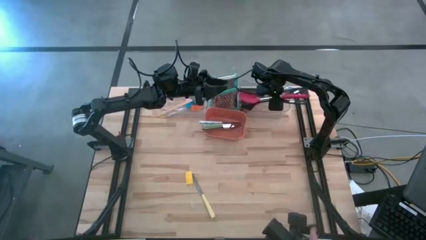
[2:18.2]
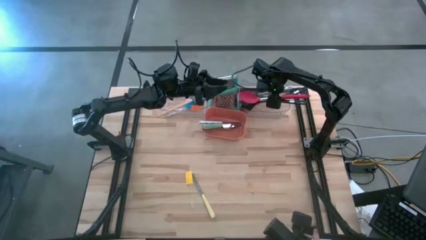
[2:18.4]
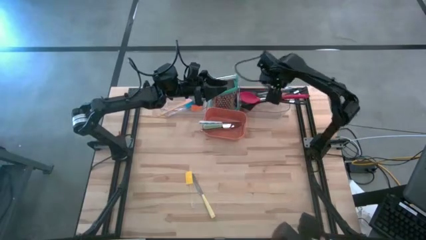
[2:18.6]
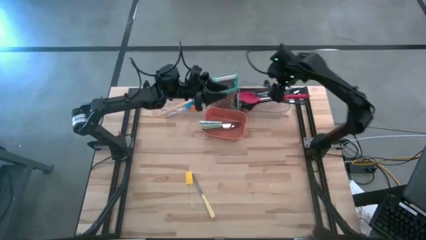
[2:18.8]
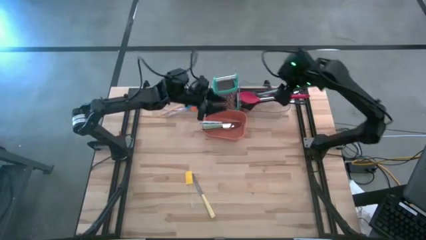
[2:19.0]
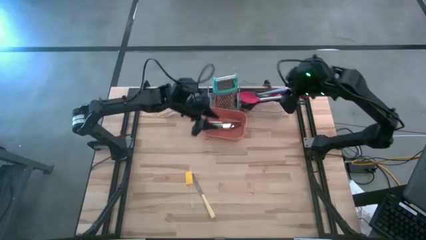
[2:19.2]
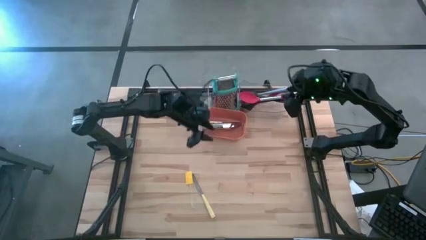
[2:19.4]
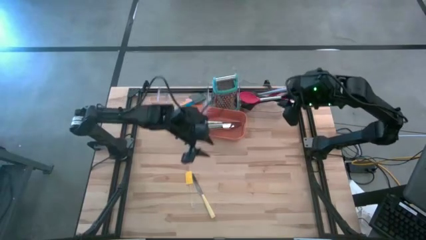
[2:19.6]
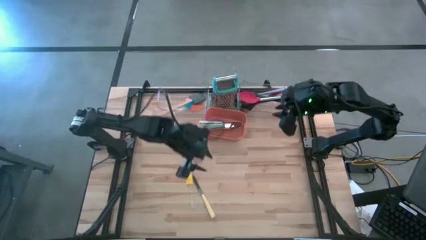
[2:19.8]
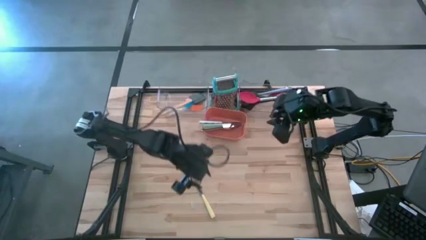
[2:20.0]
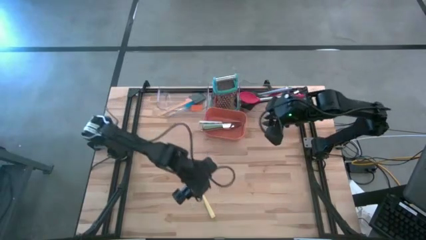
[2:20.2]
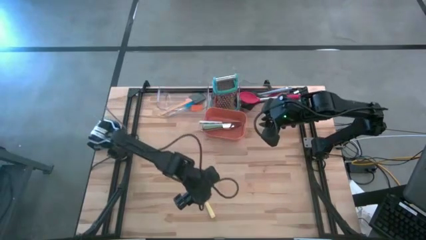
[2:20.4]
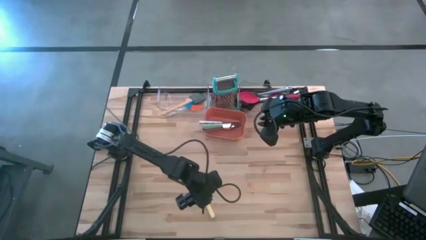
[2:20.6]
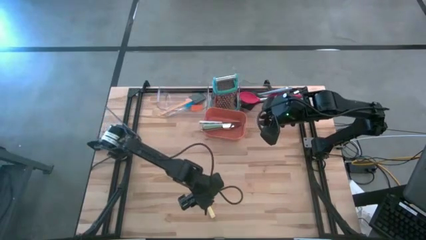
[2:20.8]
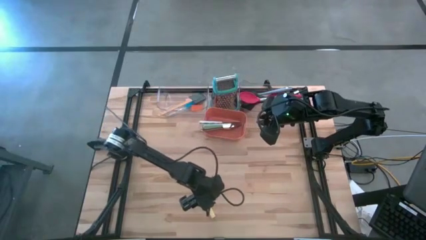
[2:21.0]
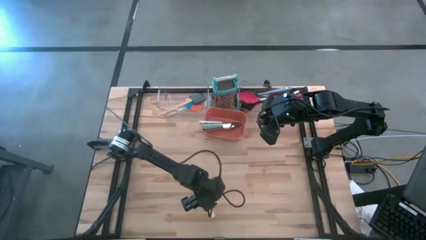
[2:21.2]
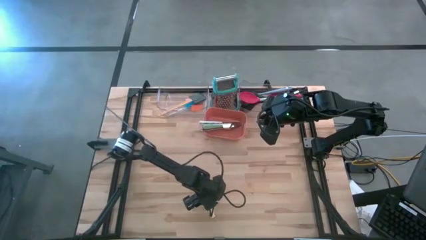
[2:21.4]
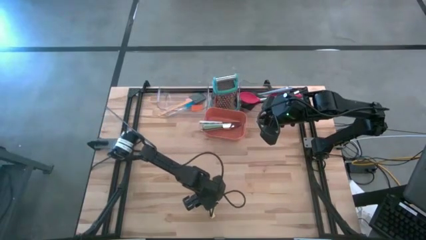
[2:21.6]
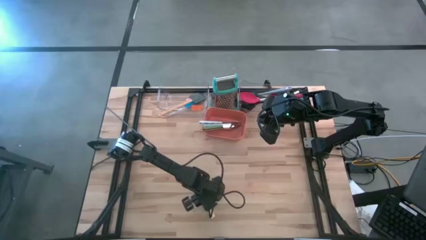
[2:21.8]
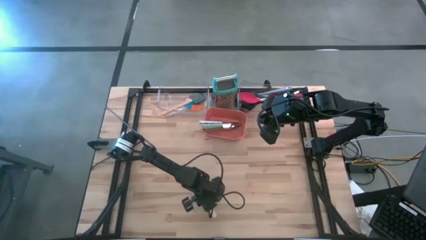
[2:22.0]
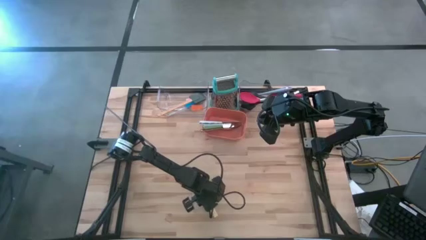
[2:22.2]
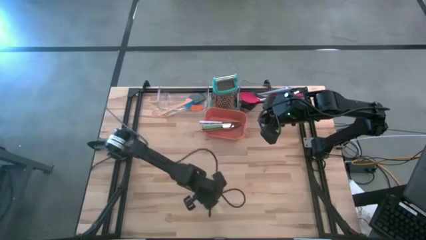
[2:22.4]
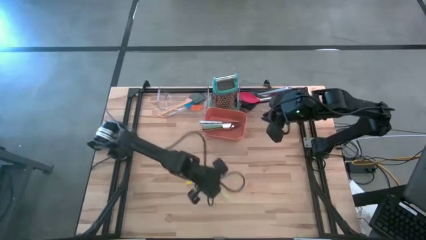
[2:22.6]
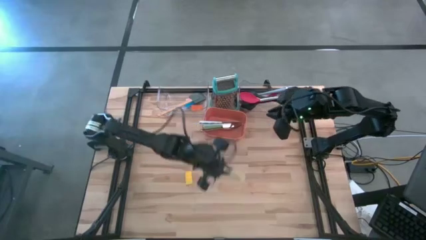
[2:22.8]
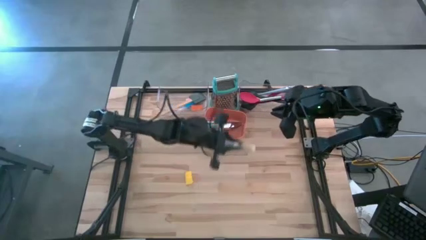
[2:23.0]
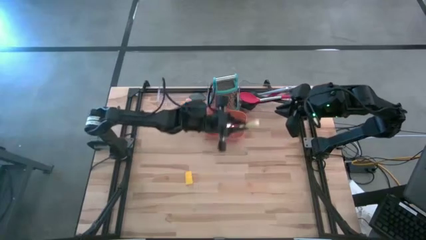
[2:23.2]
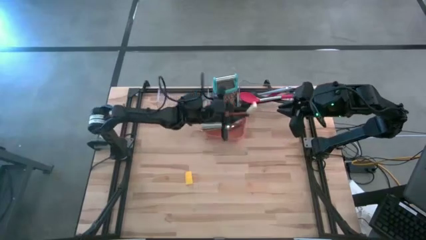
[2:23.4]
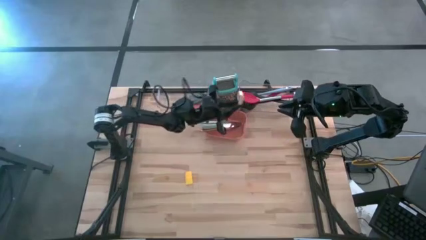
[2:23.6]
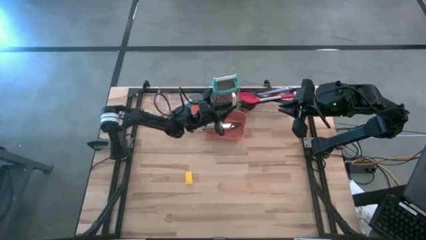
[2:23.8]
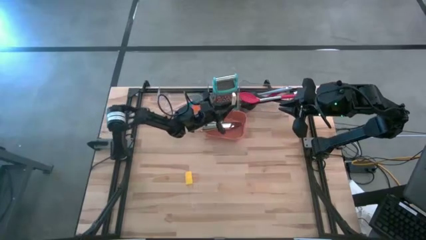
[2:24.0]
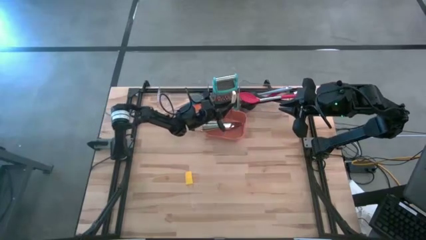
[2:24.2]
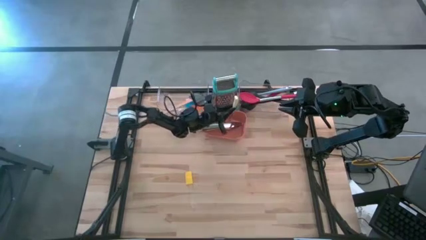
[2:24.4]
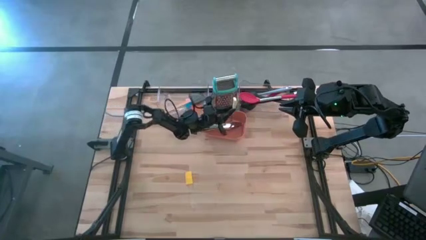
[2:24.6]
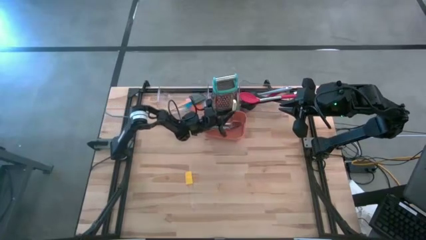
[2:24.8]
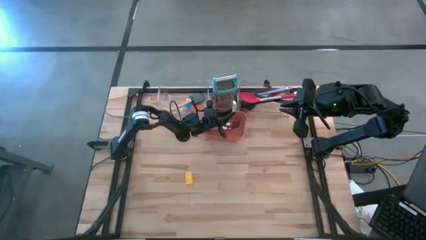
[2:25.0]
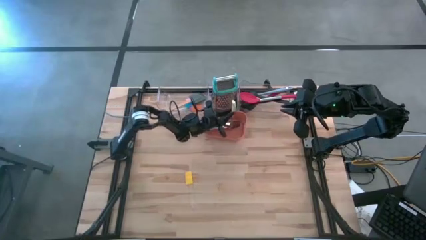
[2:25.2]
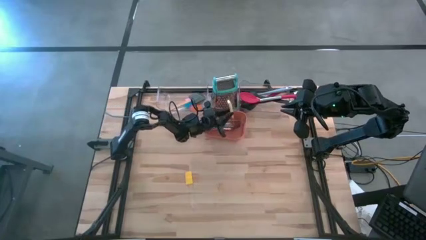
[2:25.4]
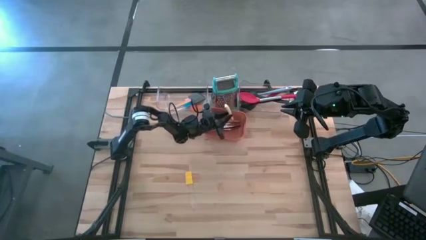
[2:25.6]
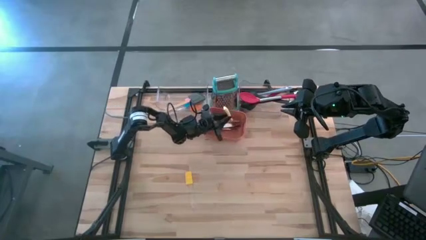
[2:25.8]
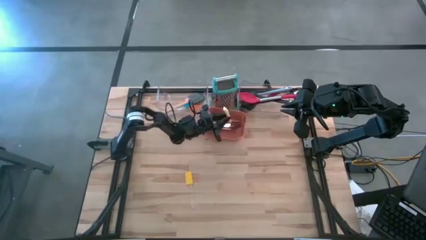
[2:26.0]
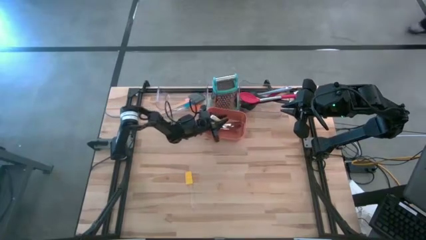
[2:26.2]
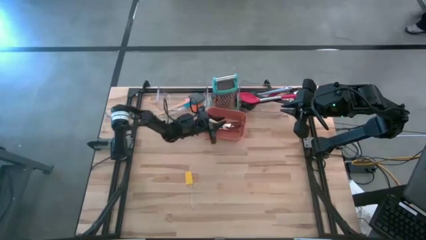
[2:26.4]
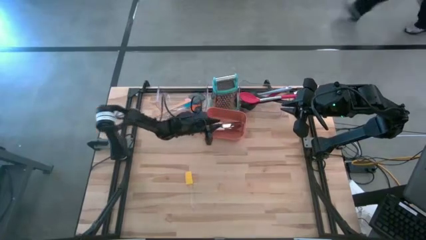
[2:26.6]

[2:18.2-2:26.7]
Task: Pick & Place Kitchen Items
Put the yellow table knife into the orange bin

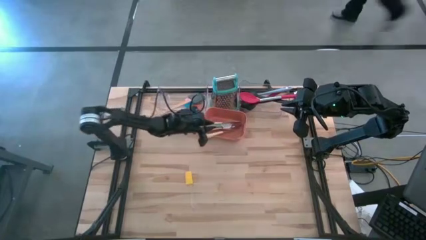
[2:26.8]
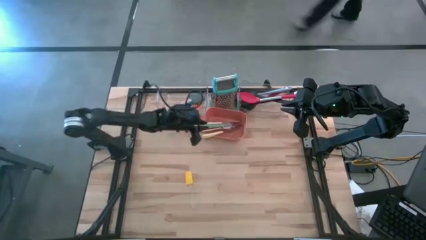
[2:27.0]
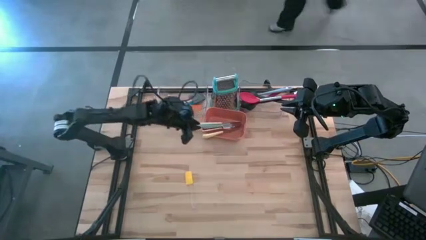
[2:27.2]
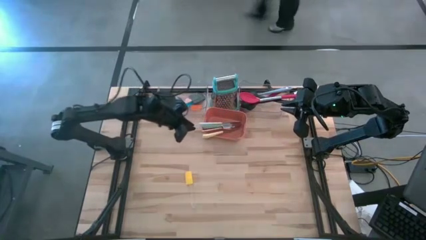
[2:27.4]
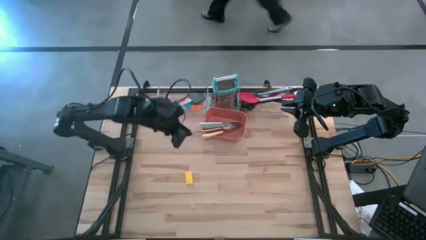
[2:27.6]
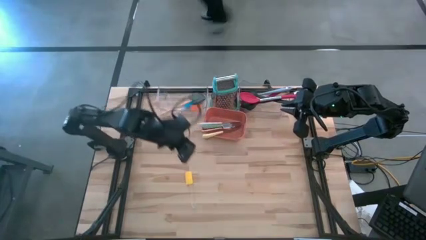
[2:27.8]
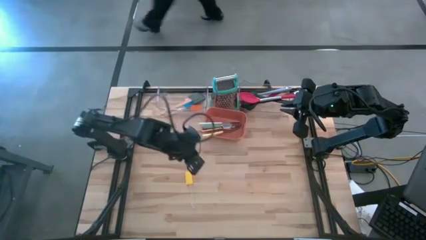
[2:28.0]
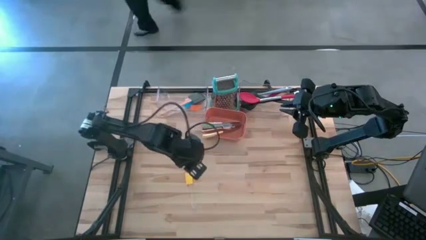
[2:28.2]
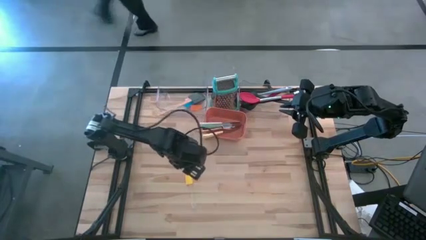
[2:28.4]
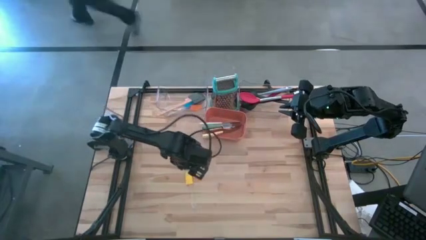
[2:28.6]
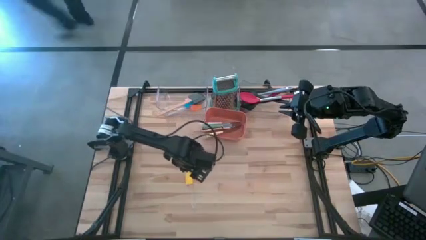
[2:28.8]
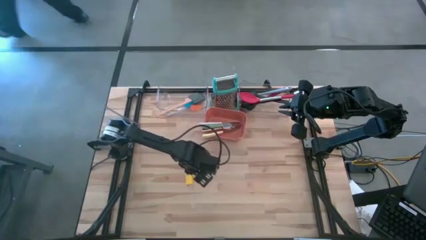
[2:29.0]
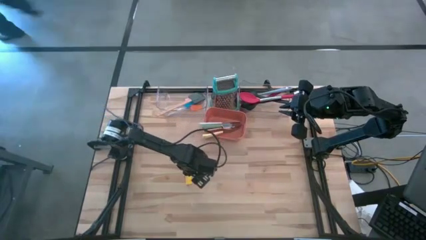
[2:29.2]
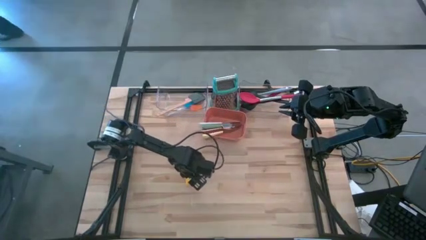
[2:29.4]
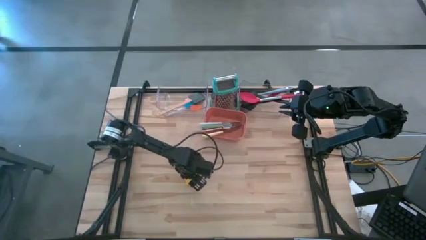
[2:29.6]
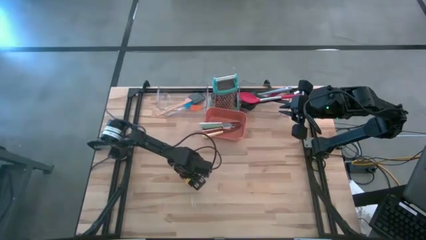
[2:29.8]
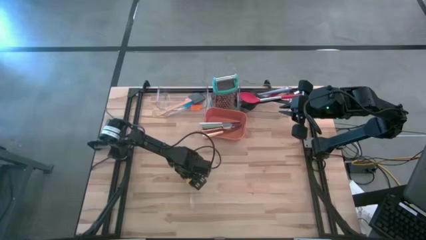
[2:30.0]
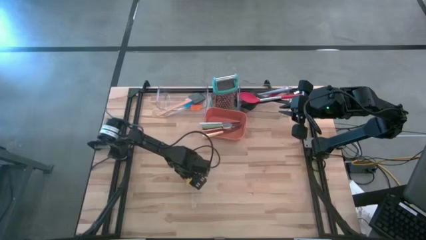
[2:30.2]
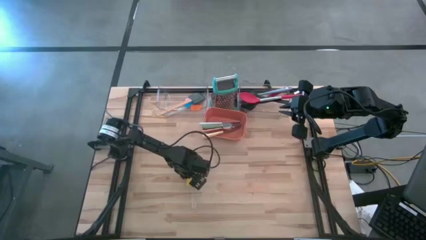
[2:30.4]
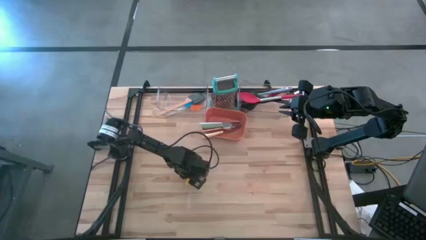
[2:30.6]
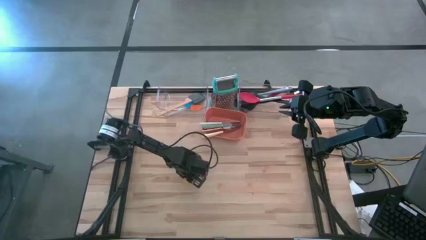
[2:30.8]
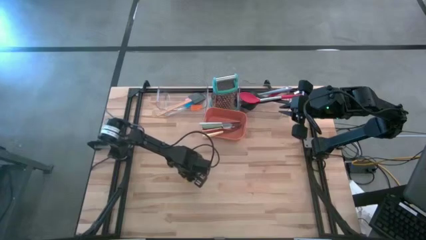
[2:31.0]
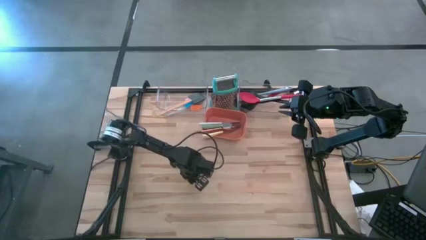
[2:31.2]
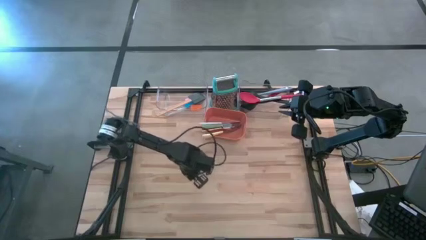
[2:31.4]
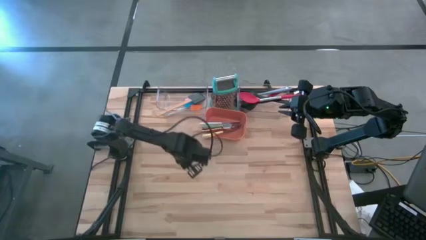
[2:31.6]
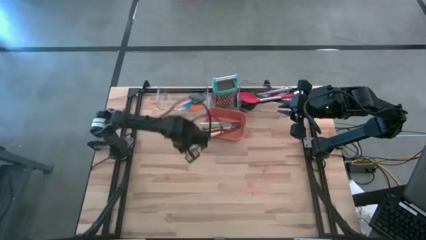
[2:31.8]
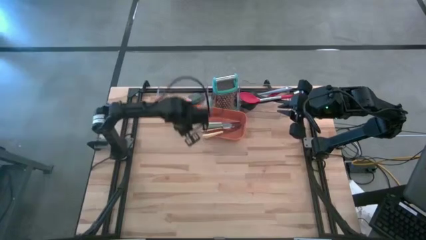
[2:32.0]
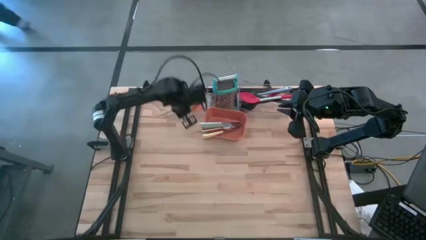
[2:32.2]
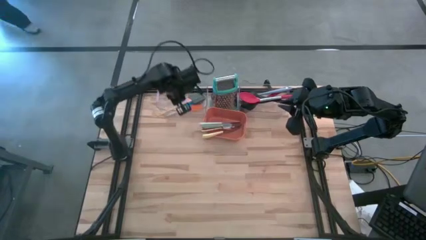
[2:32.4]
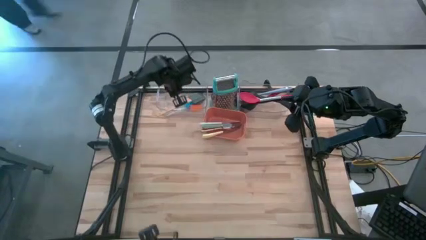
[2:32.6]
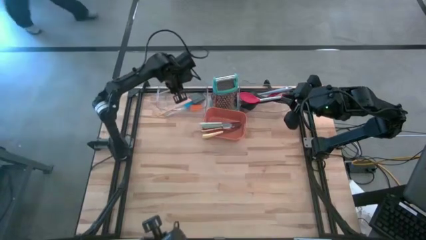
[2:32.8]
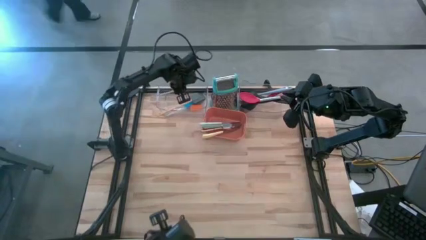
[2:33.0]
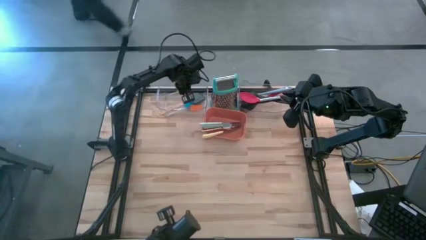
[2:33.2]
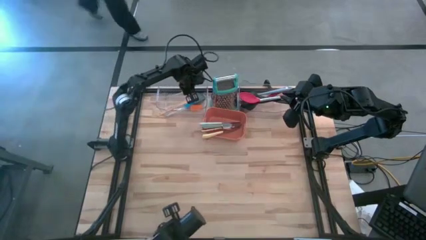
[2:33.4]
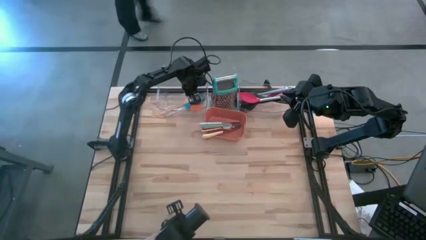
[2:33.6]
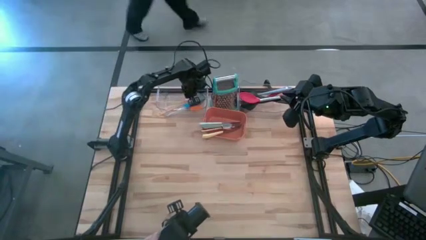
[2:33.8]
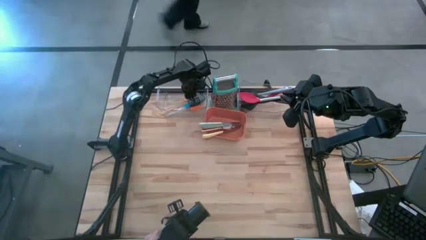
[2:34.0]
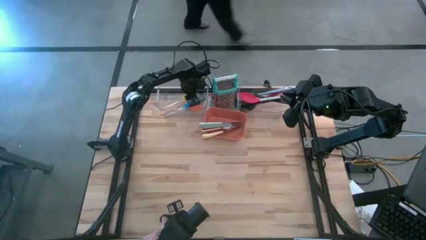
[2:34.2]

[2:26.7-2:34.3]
Put the yellow spatula into the left transparent bin
